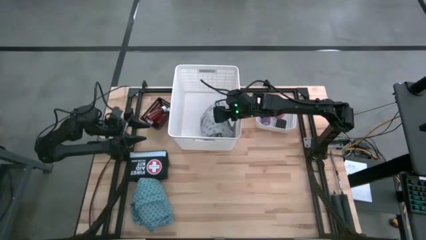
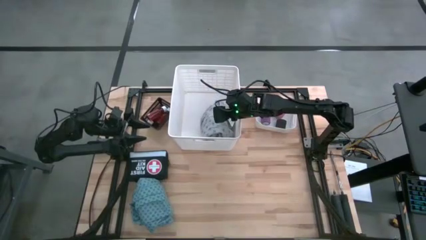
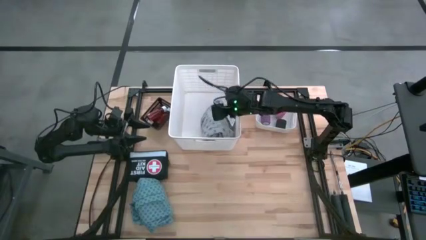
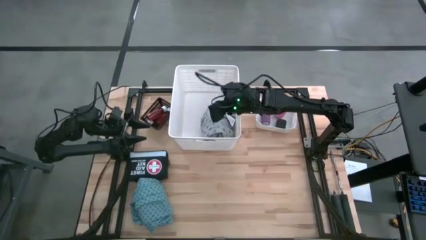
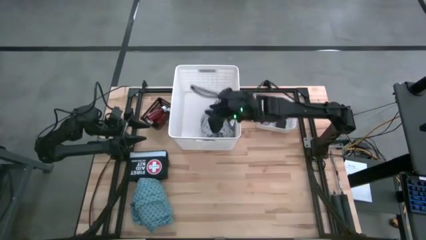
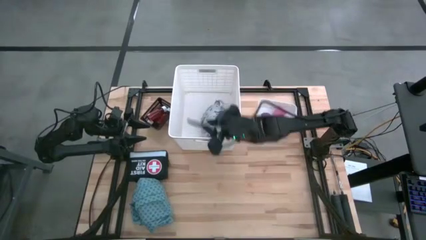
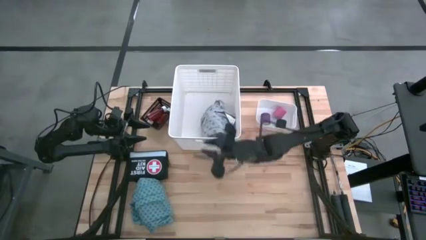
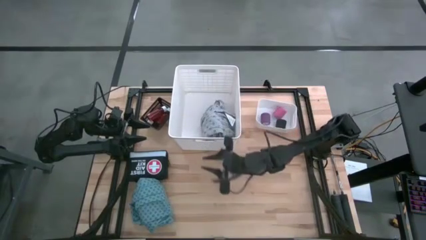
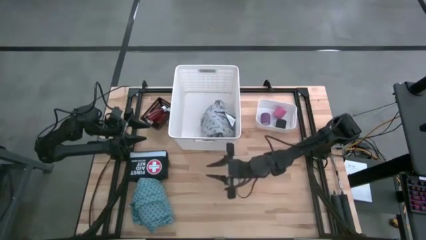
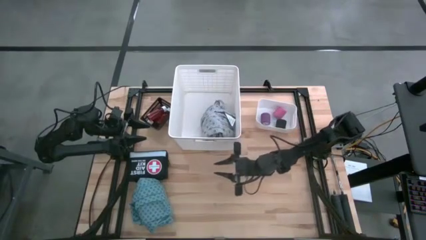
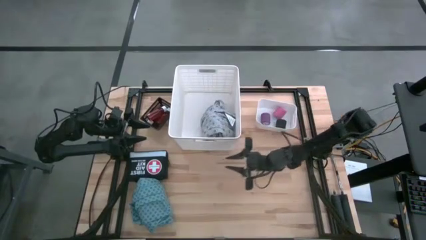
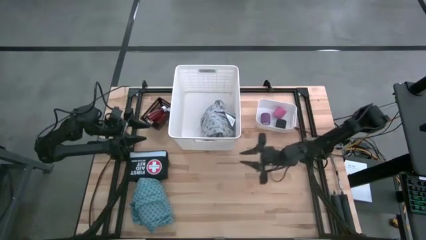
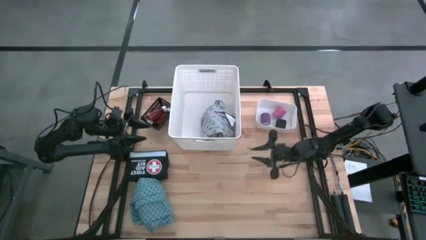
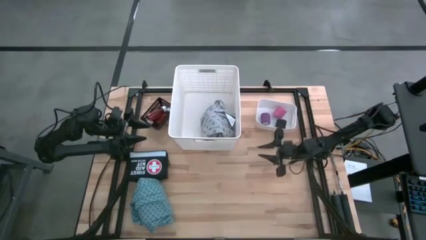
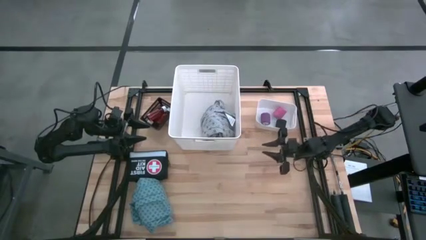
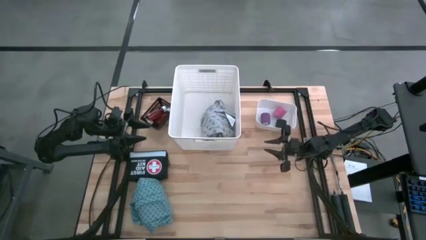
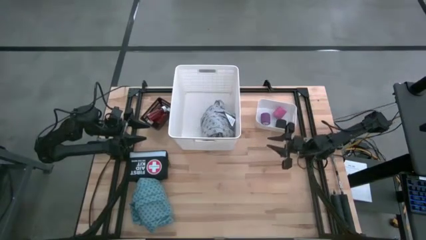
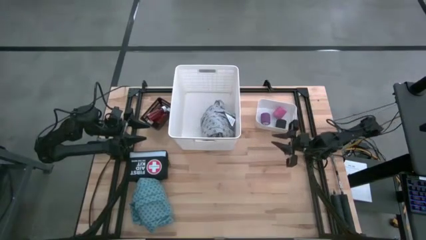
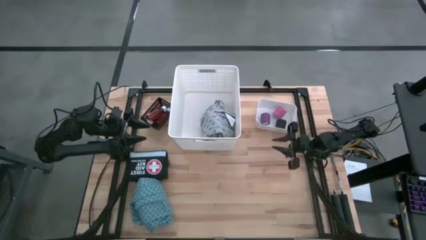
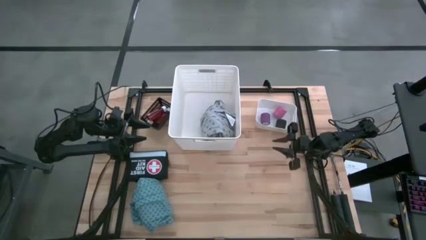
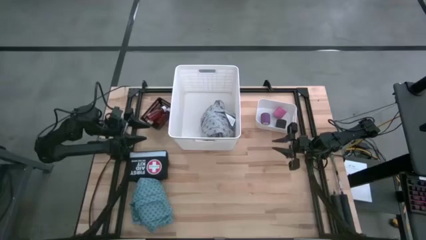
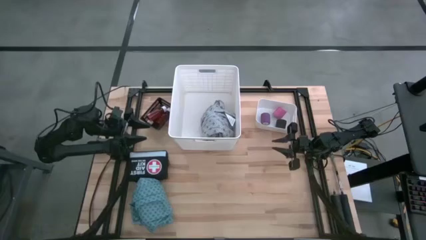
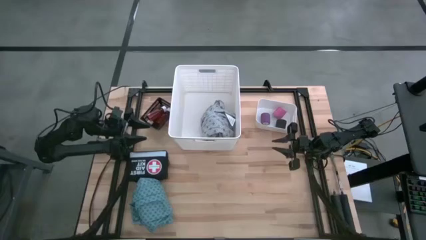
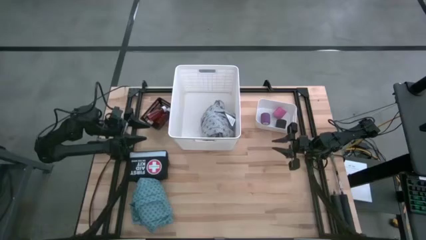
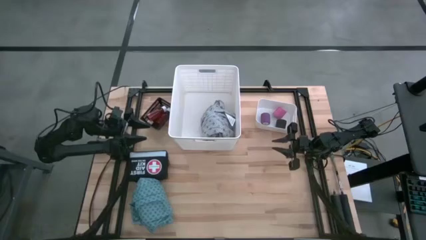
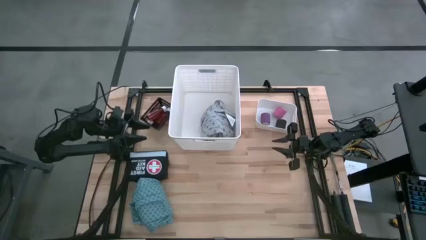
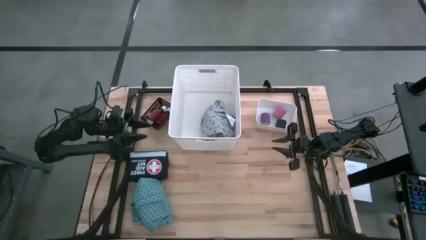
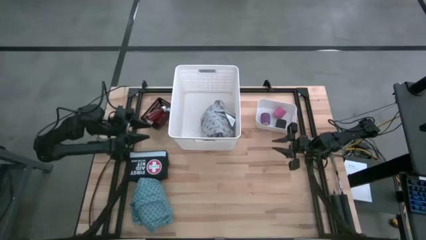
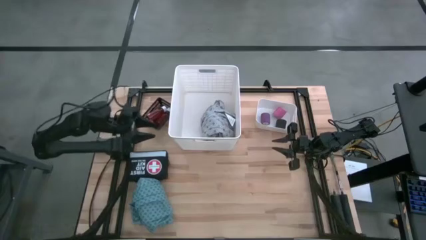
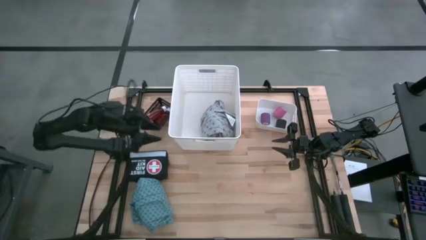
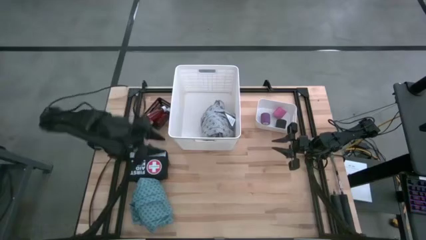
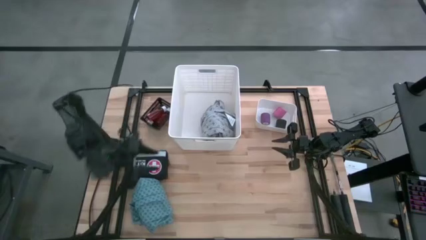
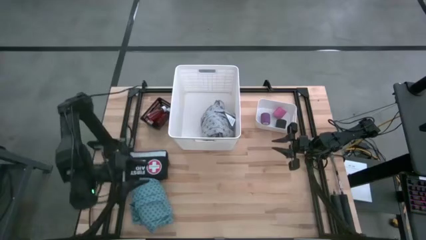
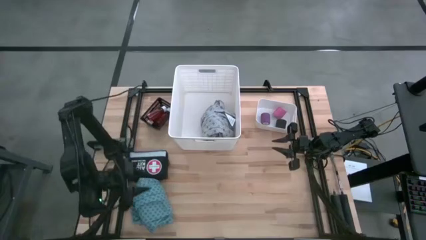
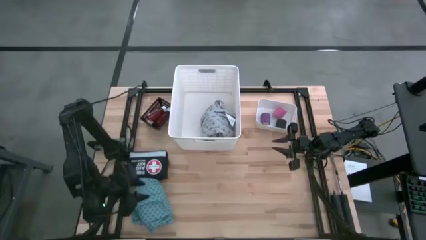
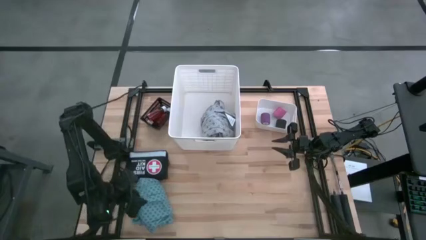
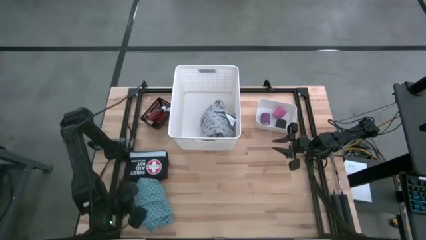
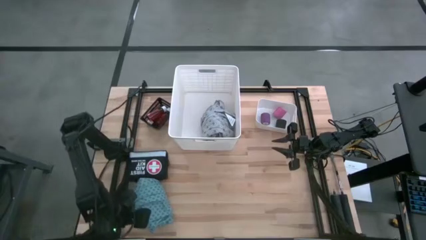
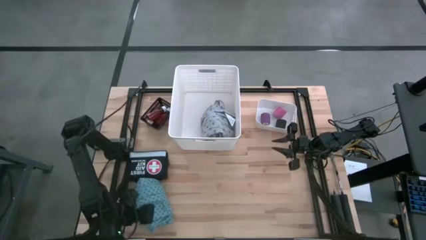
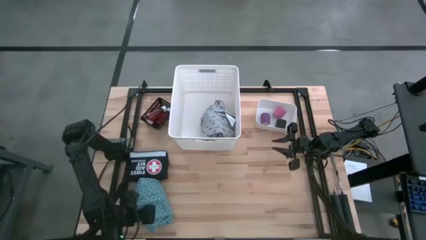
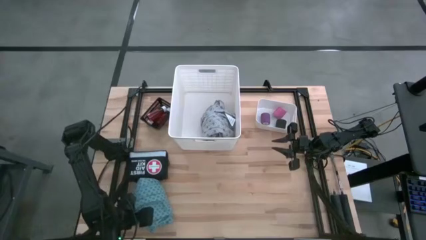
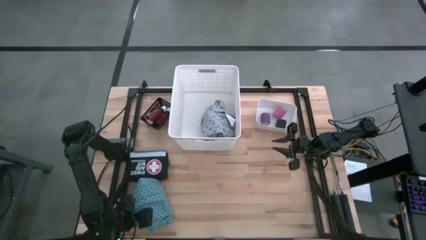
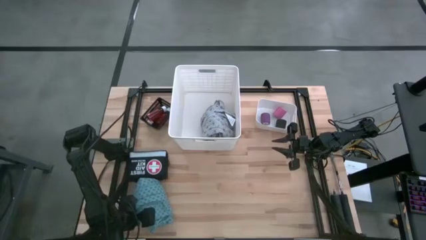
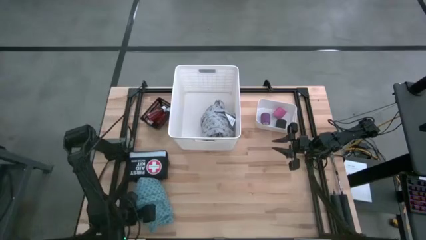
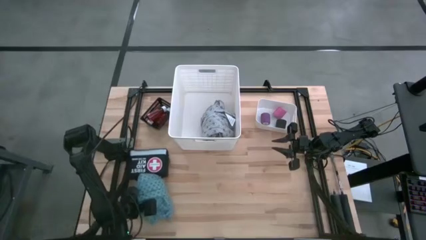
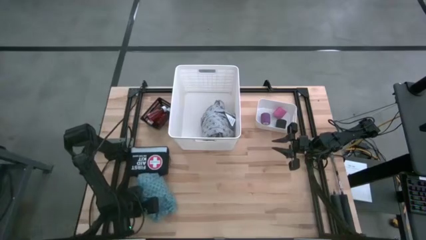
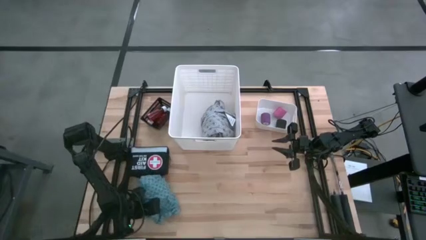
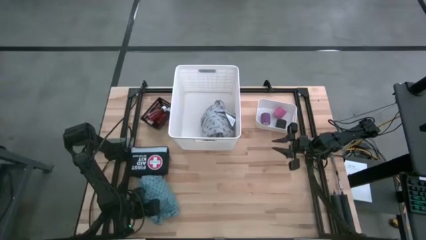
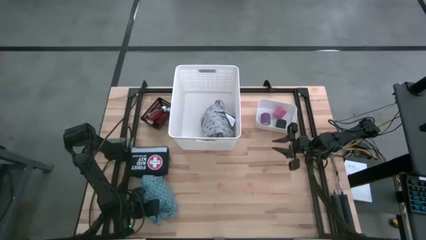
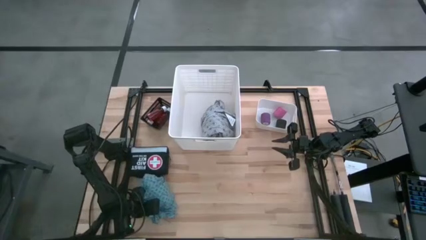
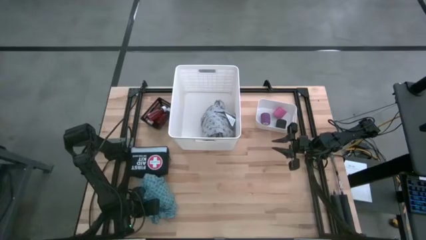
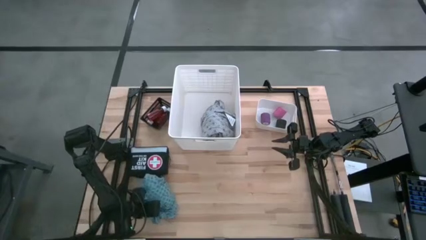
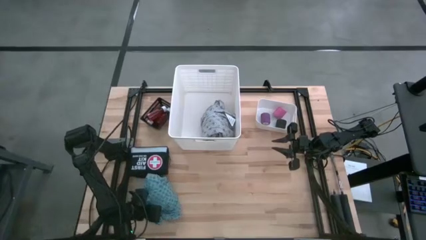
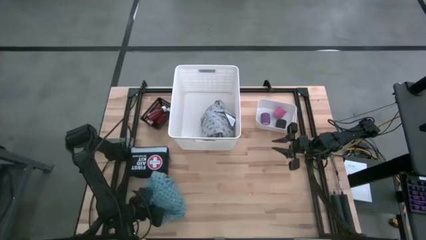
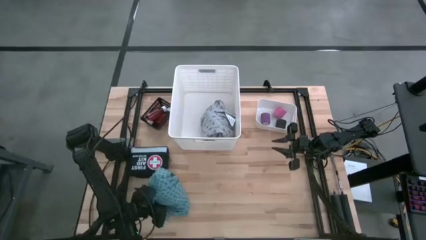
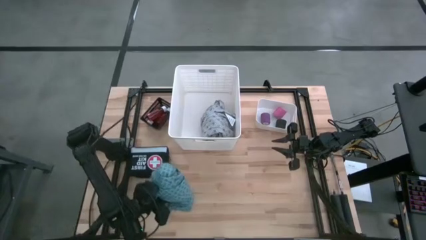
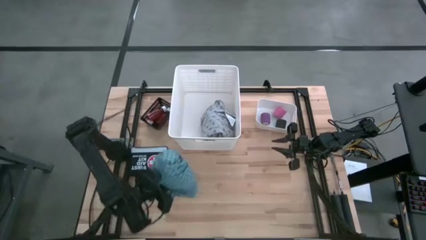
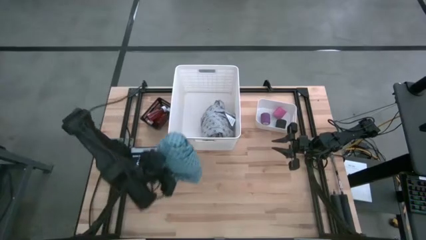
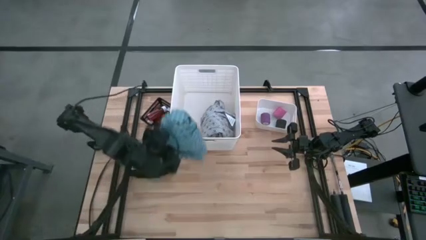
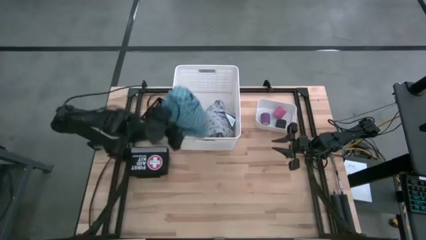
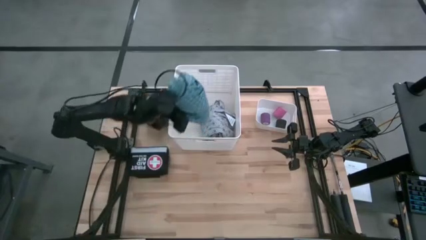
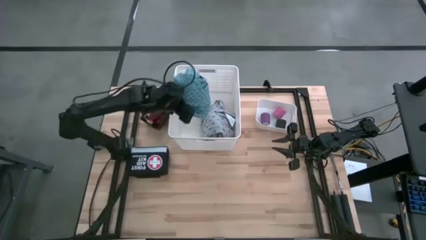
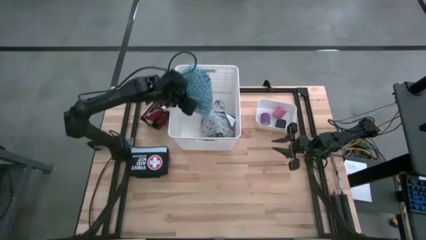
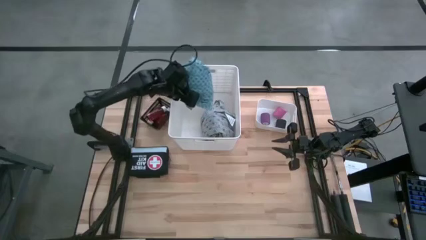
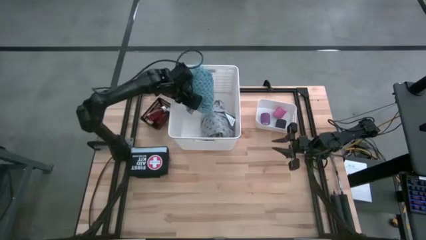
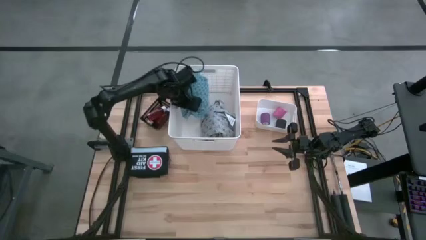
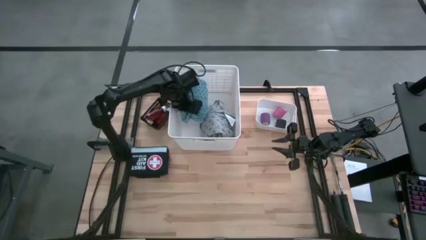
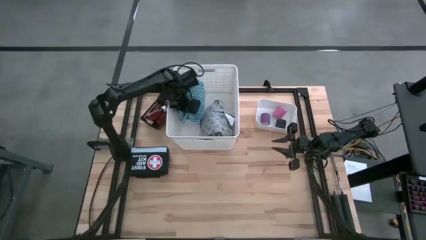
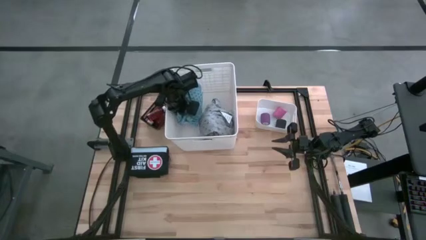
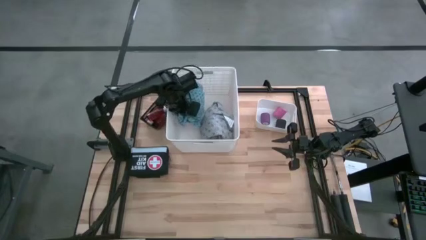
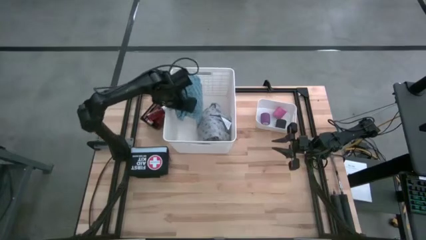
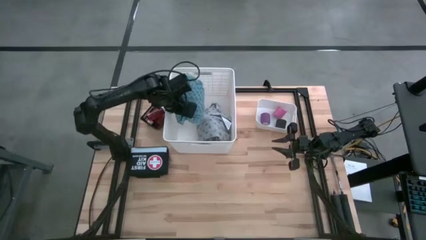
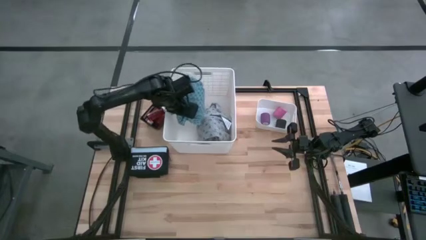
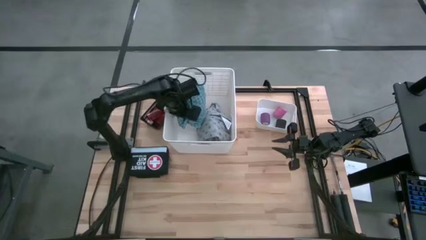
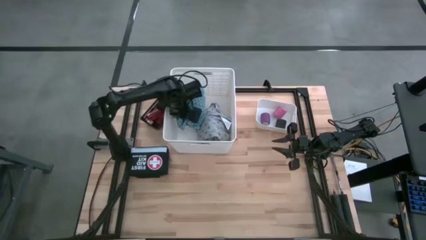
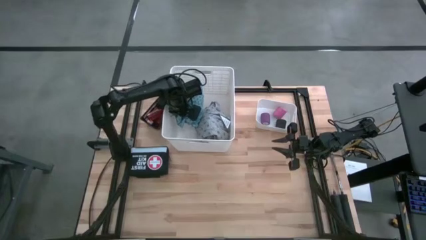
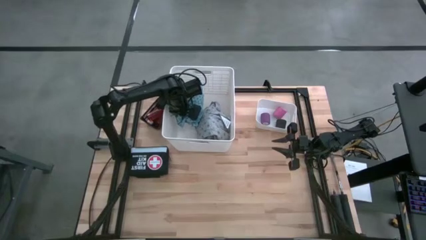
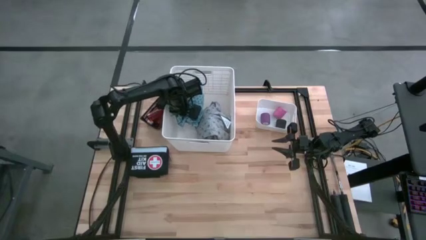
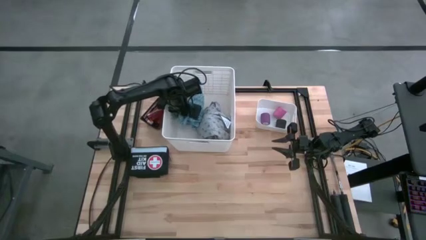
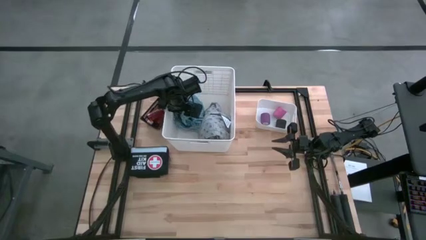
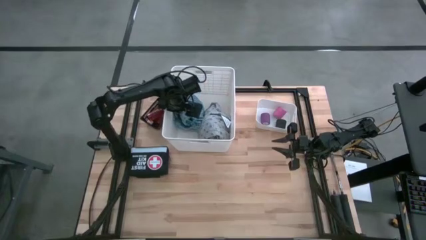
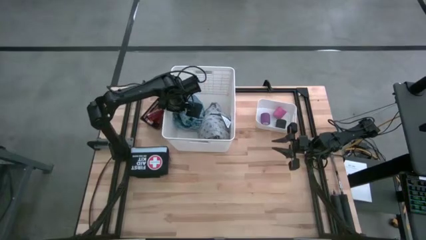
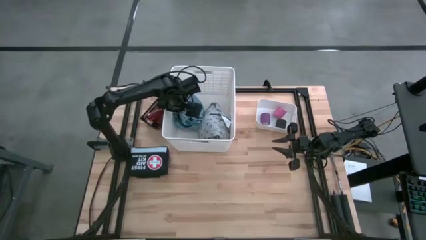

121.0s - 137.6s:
Task: Pick & Place Medicine items
Put the blue patient gown into the white organizer
